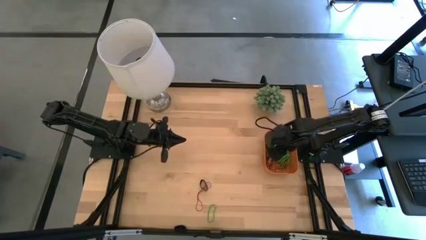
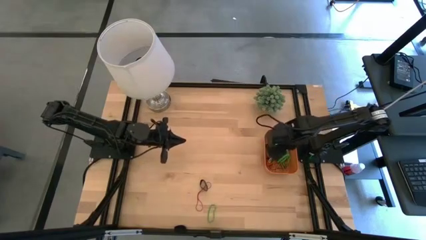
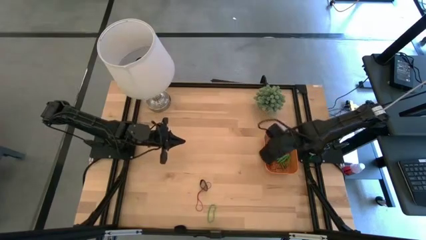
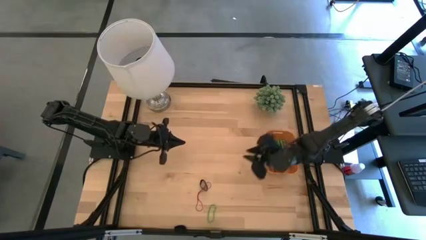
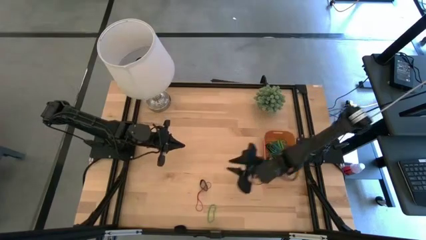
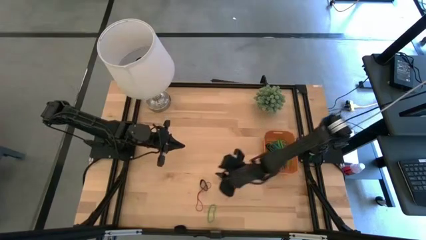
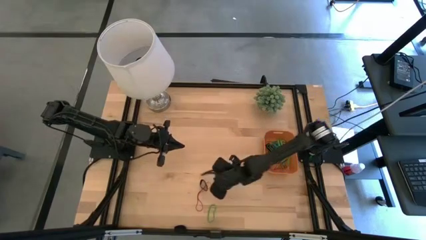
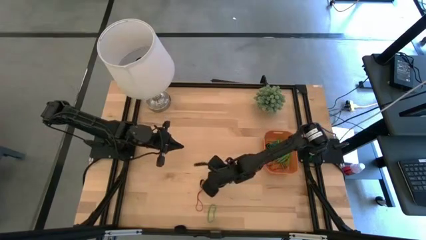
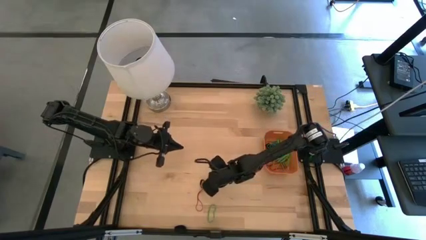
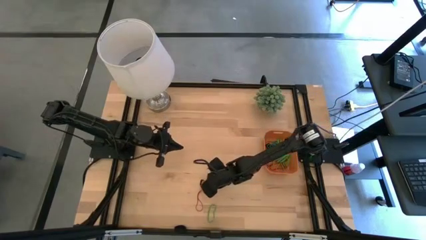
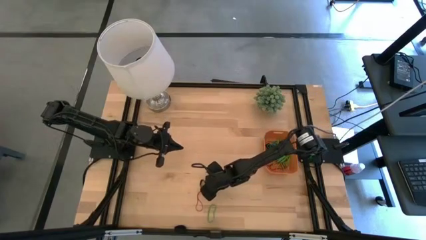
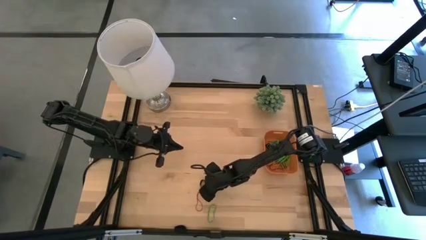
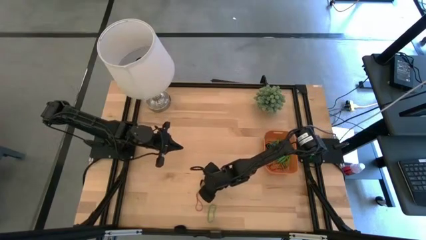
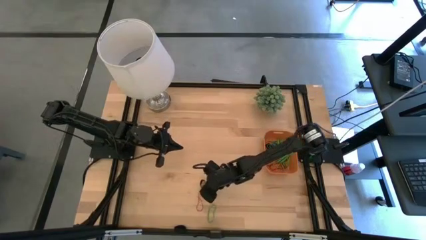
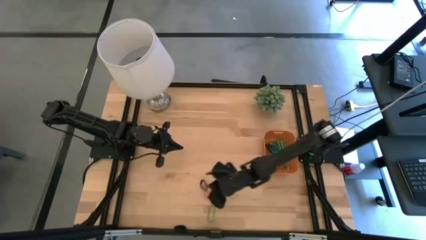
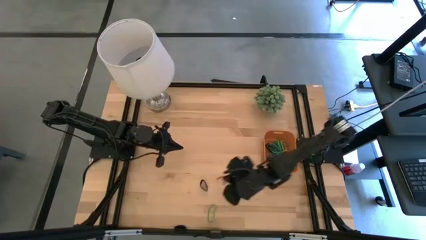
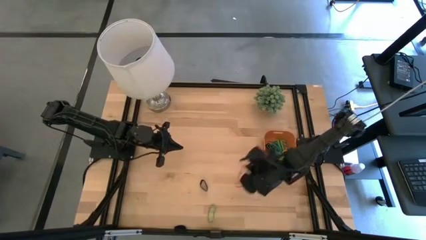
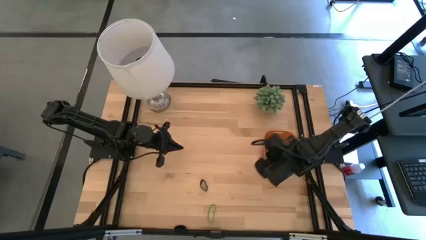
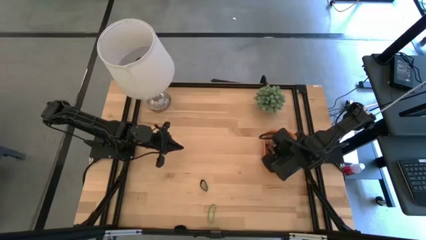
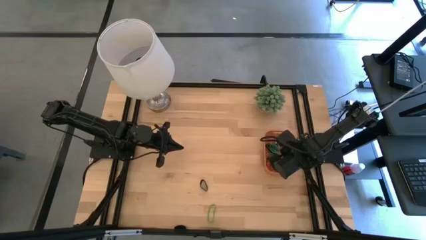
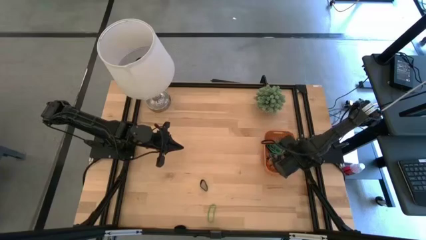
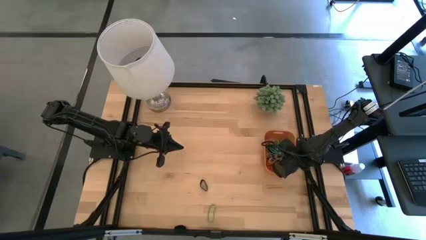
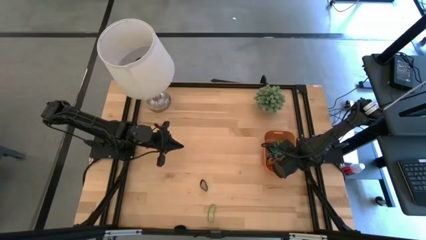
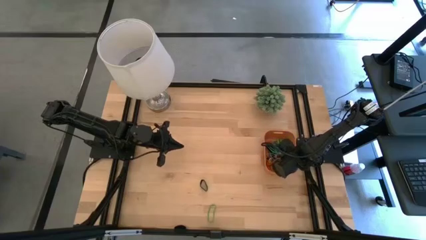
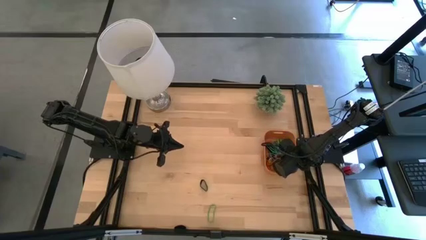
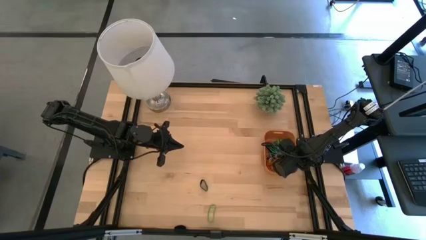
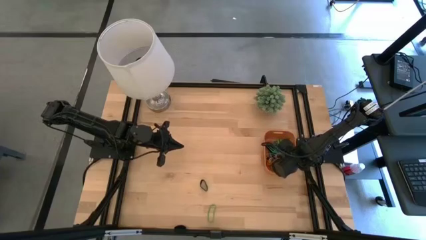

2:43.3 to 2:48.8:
Task: Pick and place rubber bands into bin
Put the red rubber band into the orange bin

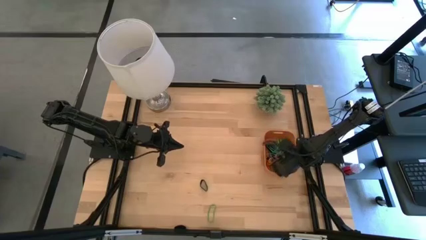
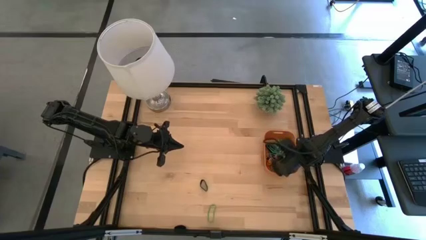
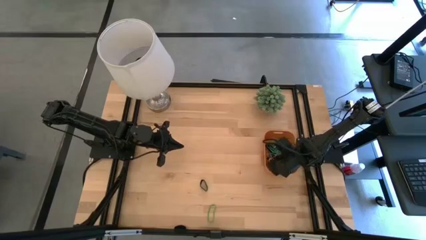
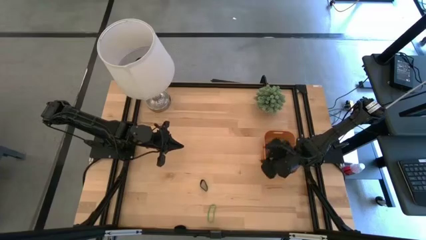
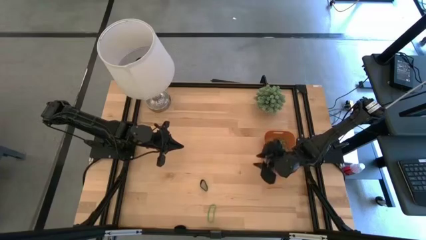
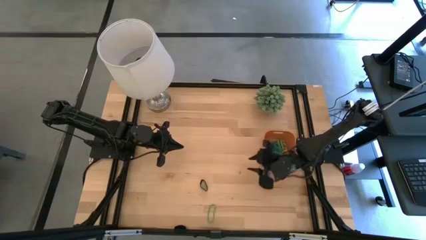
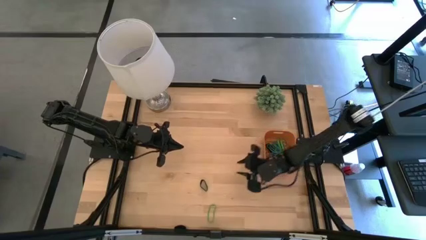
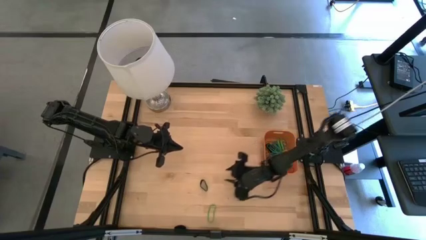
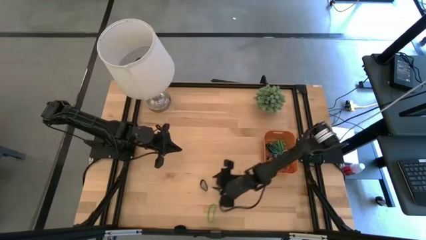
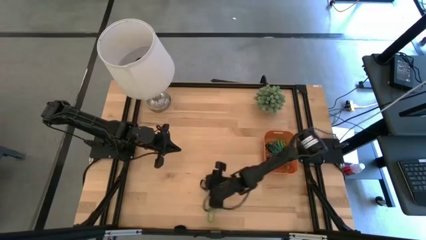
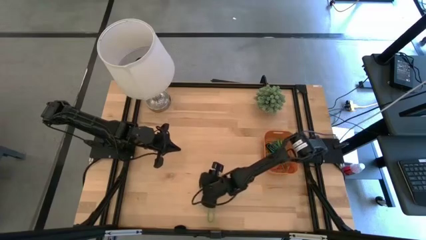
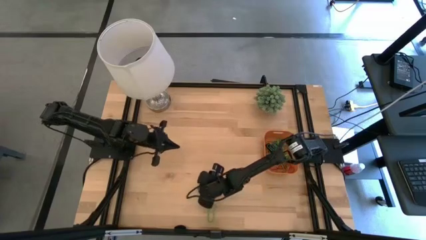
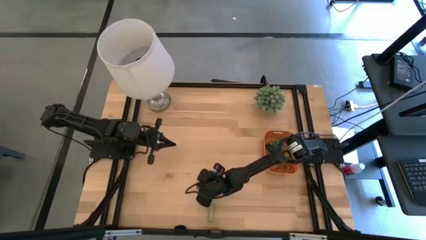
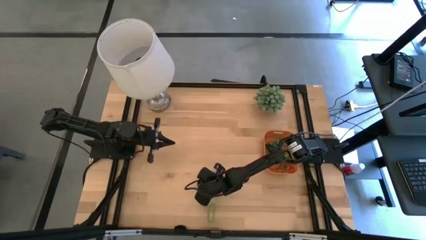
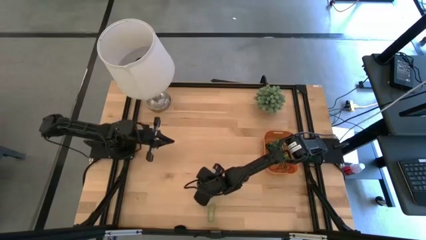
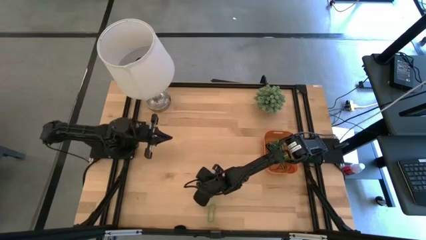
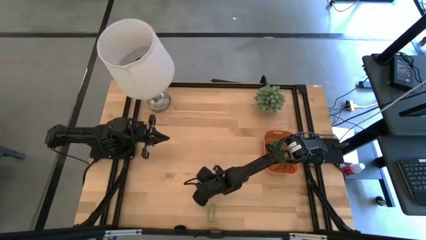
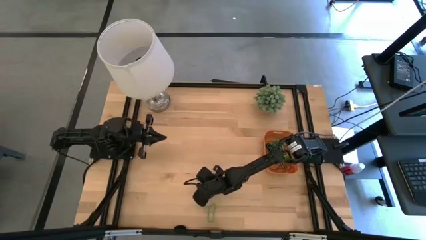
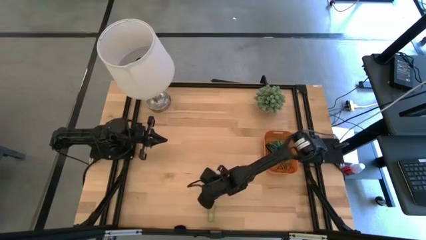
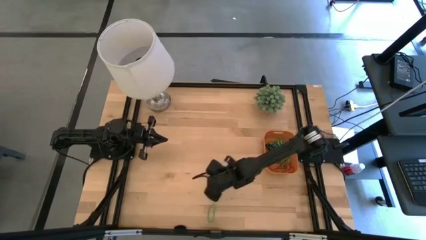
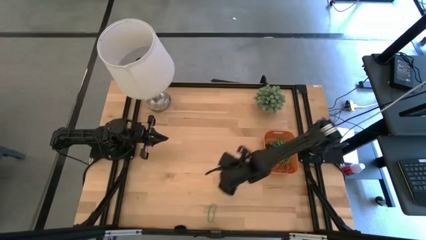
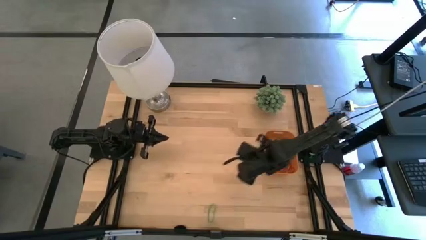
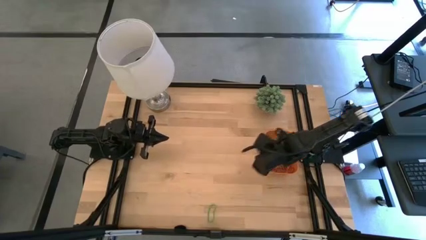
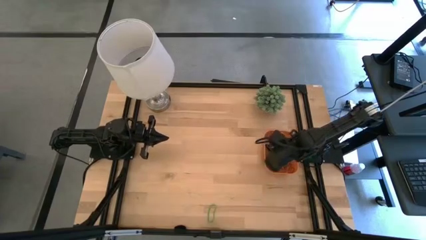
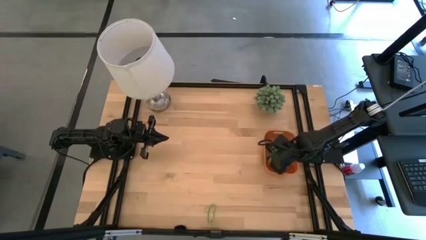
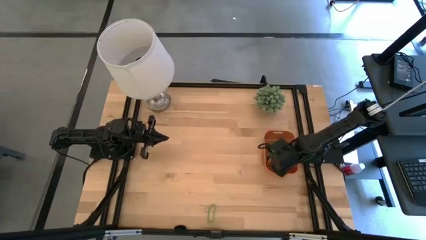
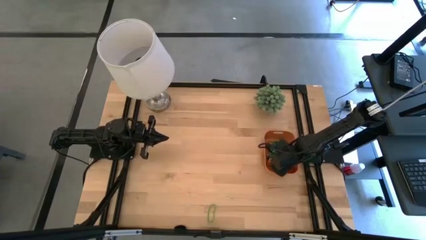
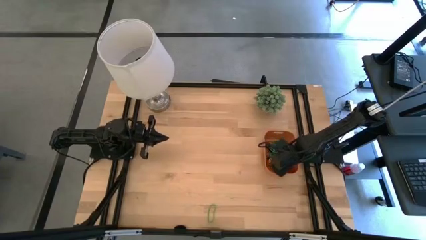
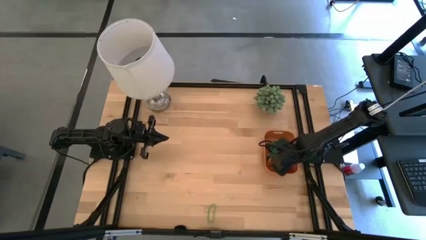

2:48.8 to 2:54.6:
Put the black rubber band into the orange bin

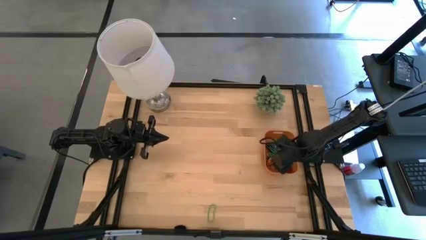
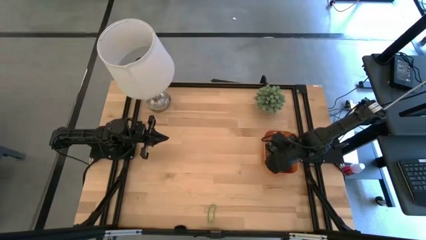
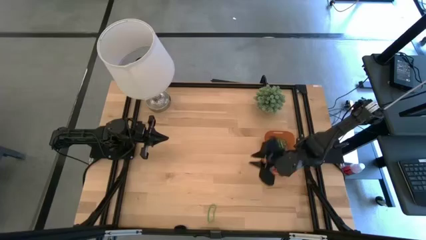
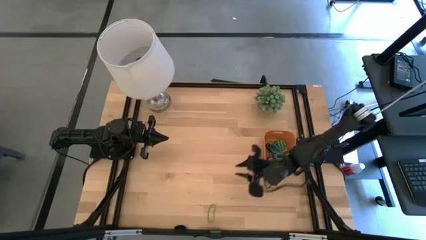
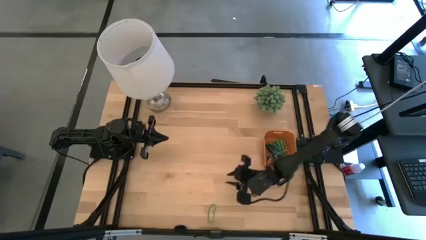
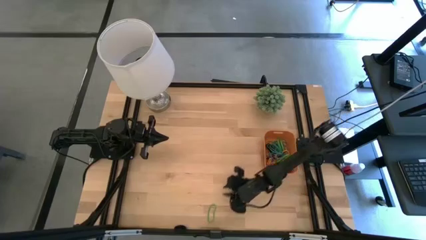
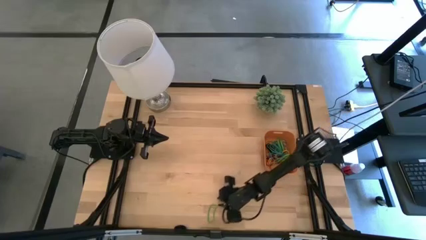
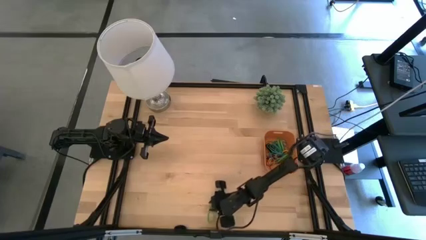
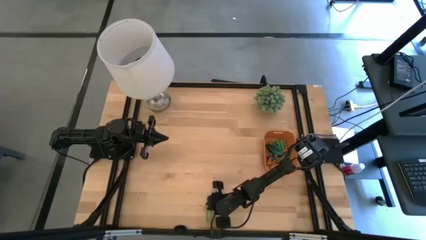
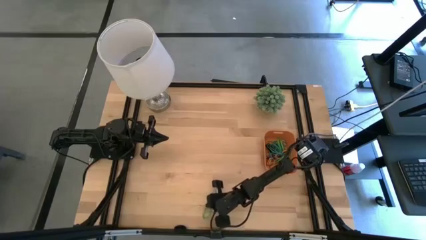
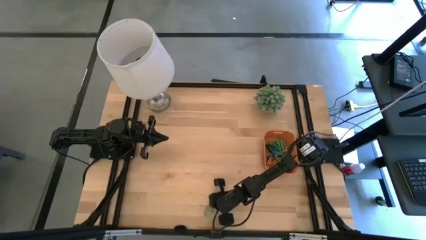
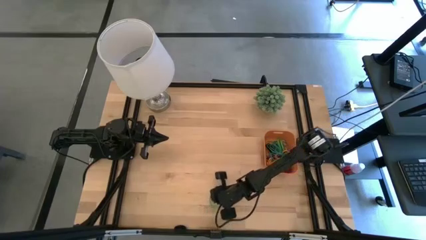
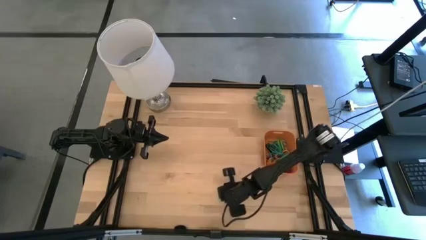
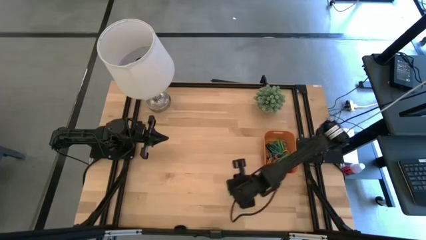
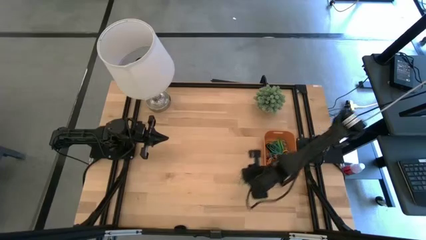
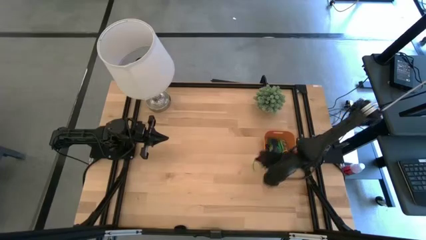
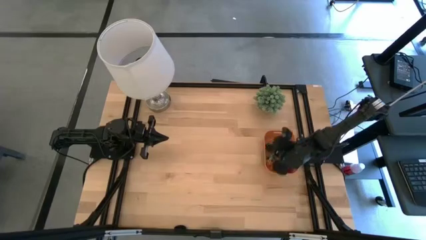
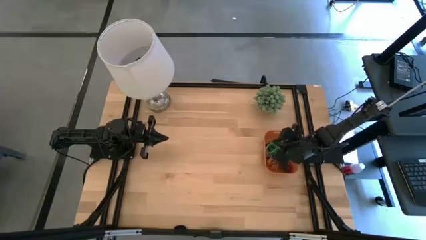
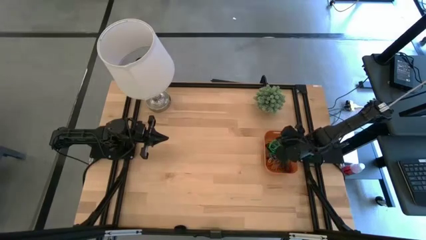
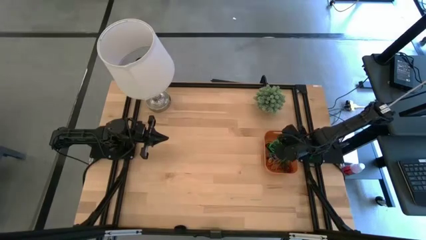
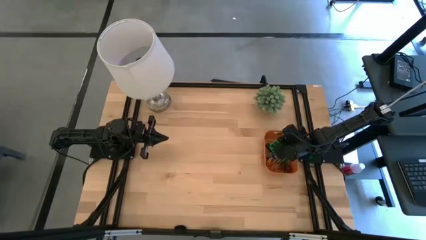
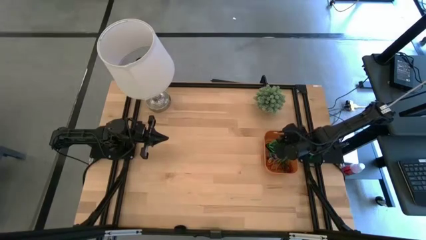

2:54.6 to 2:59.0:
Put the green rubber band into the orange bin
